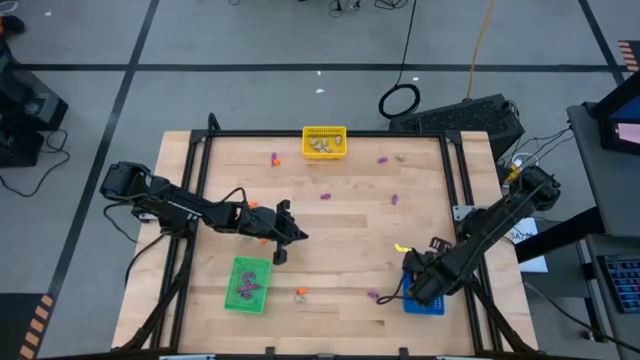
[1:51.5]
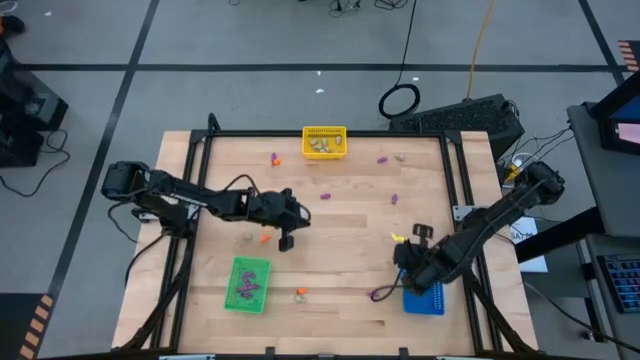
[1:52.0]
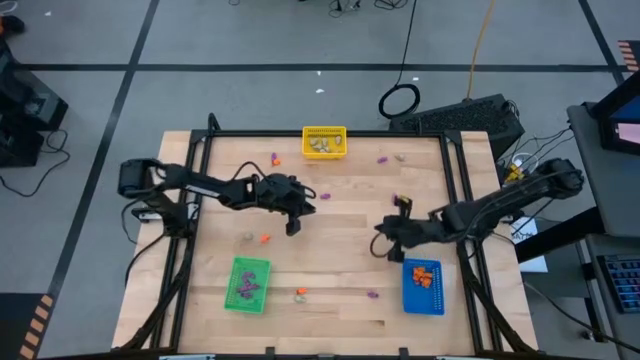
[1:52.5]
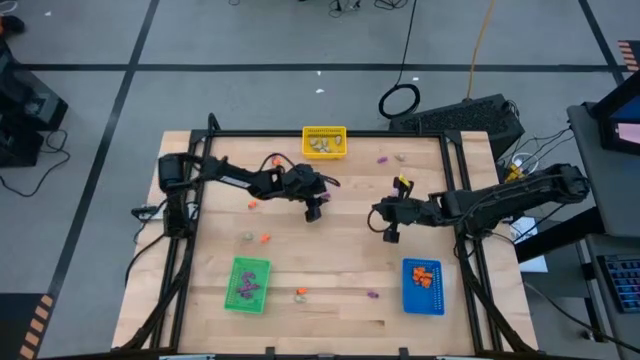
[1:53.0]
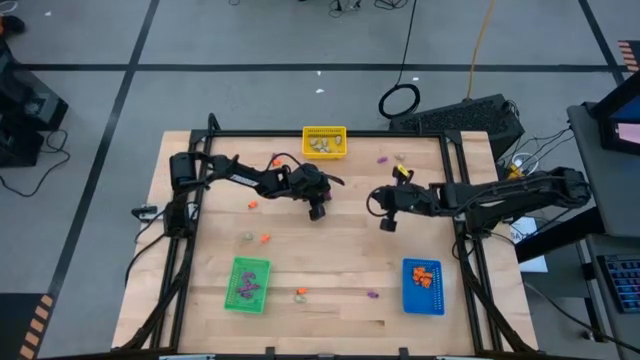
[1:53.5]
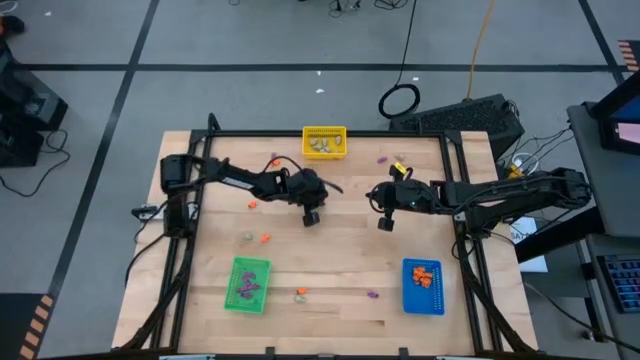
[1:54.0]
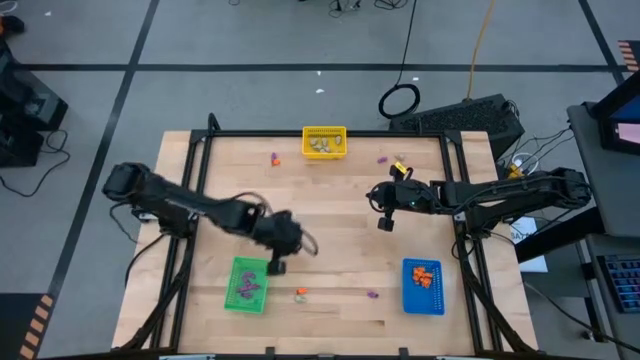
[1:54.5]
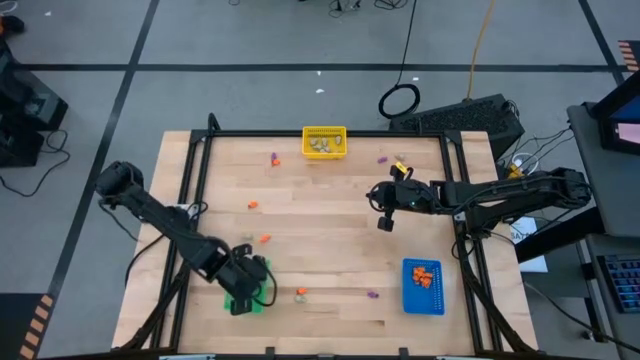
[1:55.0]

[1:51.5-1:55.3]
Task: Sort Halloween decoration
Put the purple skeleton toy into the green bin

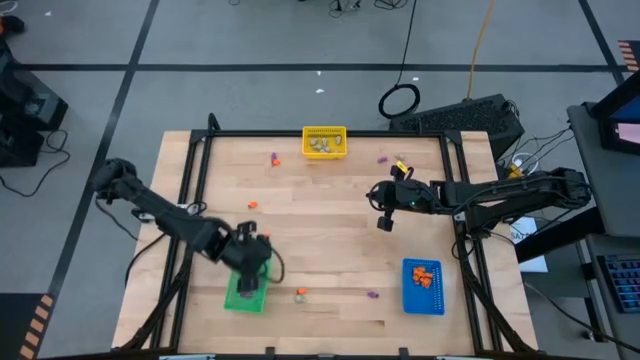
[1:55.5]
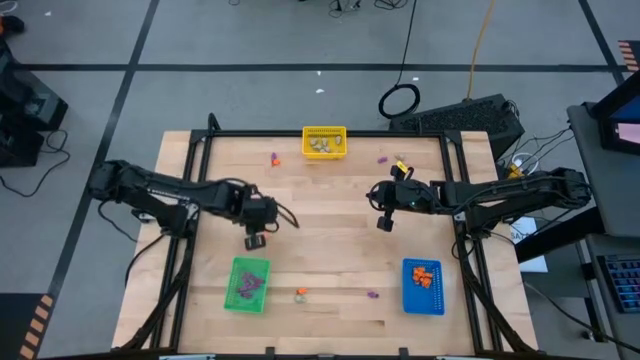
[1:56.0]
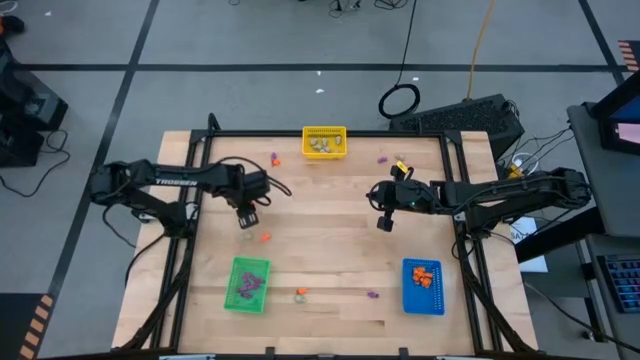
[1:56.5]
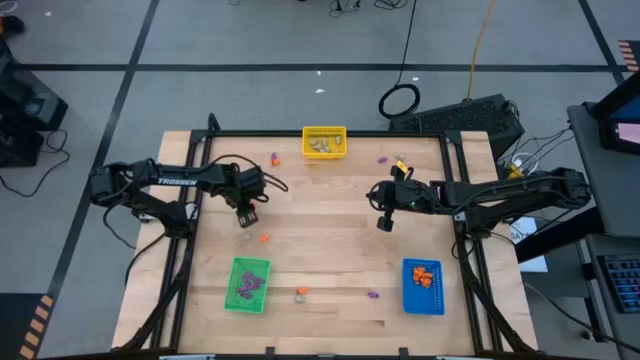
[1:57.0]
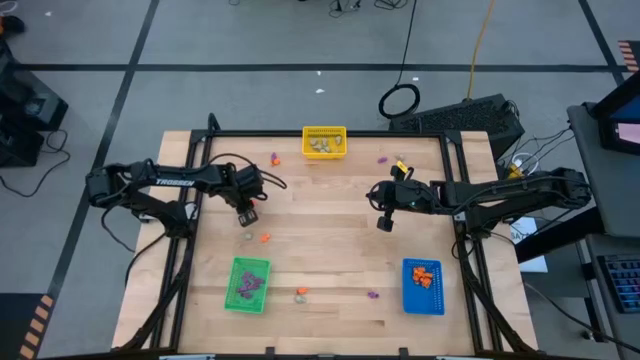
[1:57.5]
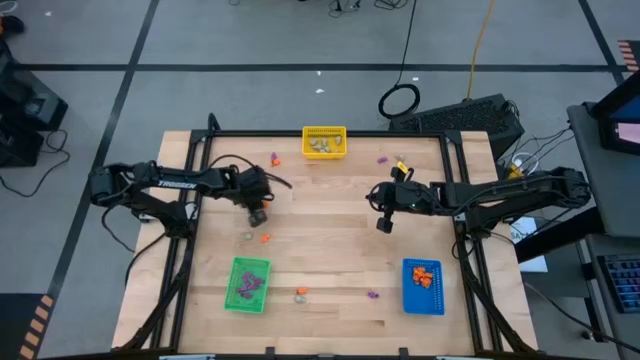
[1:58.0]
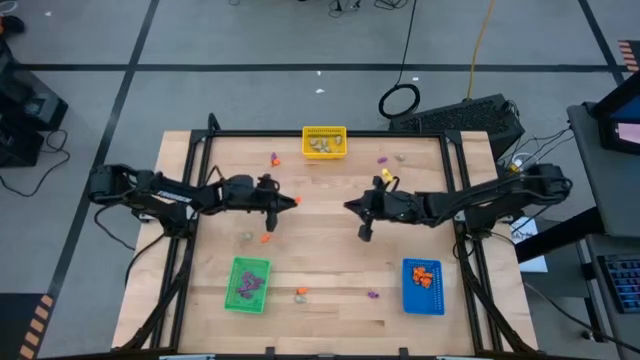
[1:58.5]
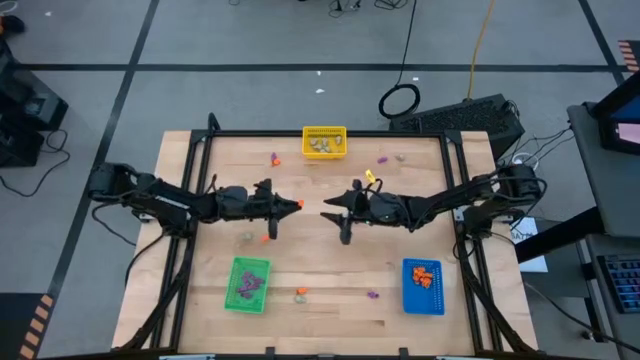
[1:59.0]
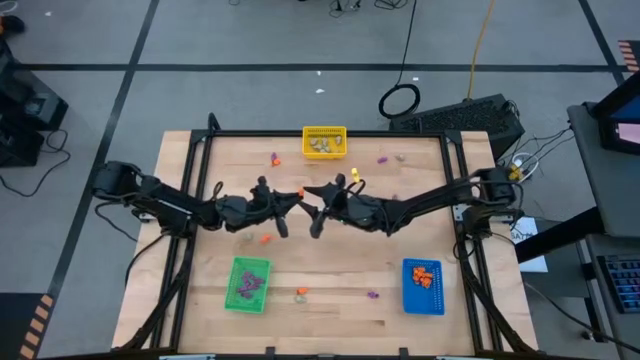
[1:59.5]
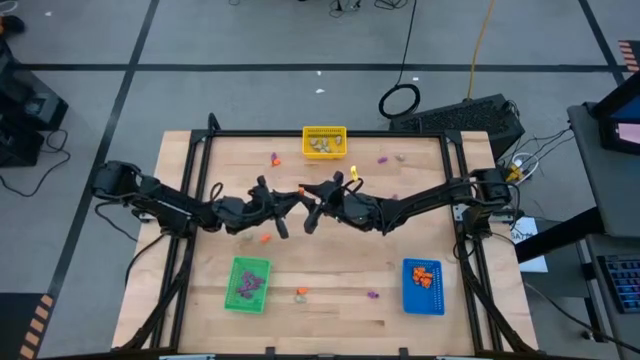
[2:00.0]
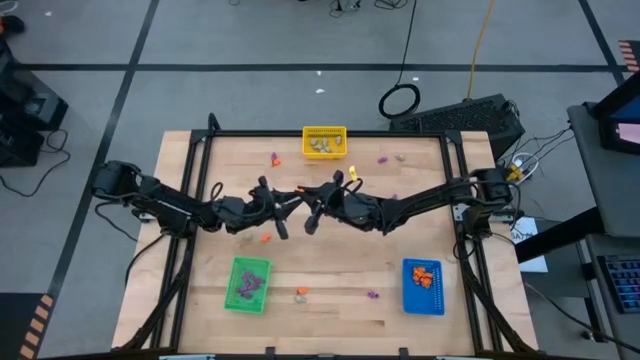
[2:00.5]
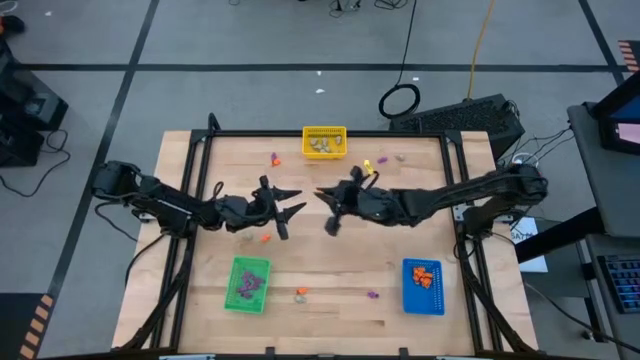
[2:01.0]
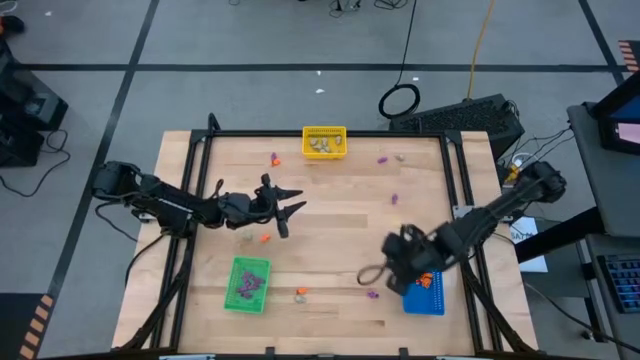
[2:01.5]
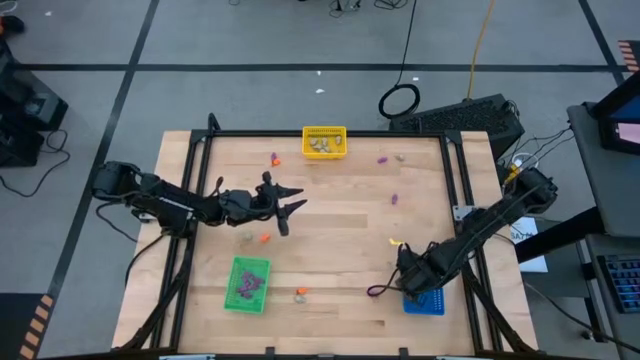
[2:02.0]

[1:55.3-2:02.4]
Put the orange skeleton toy into the blue bin

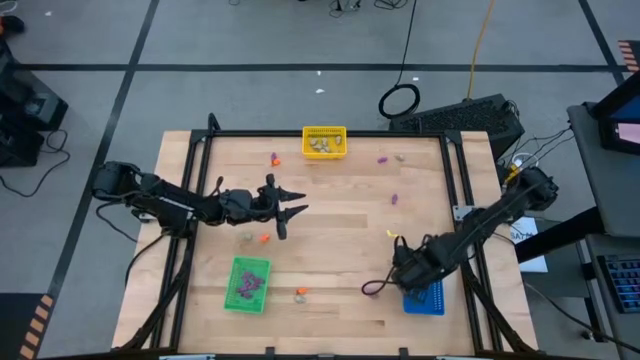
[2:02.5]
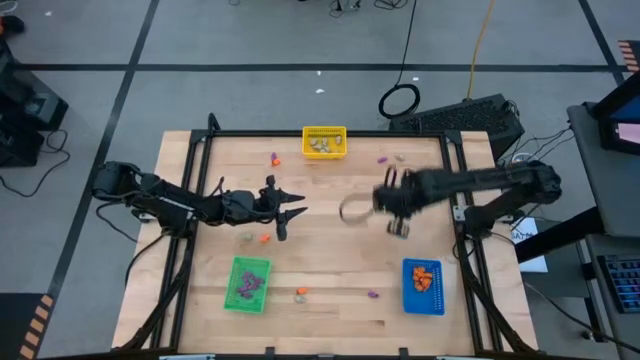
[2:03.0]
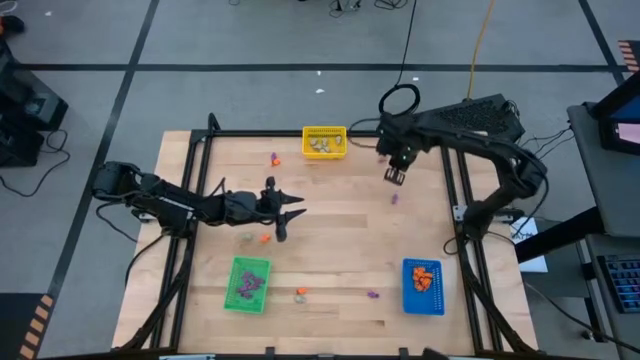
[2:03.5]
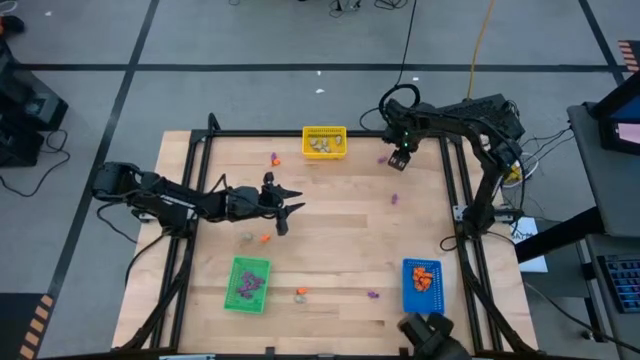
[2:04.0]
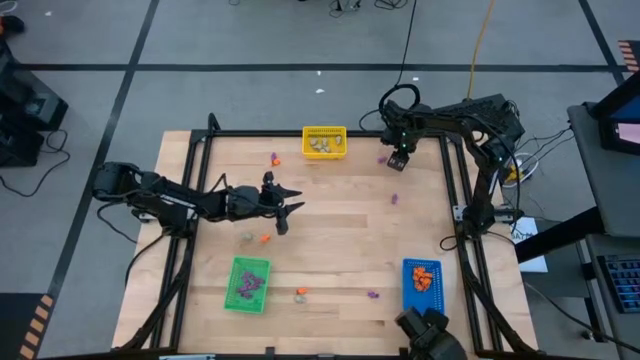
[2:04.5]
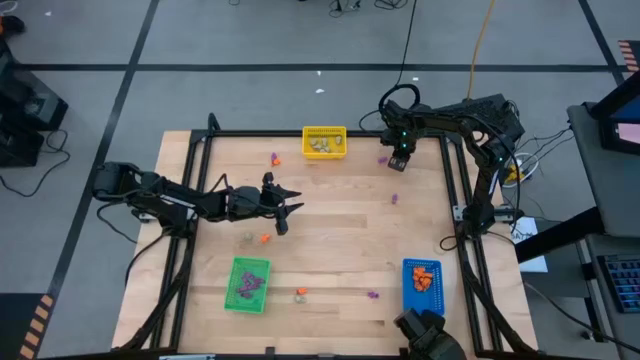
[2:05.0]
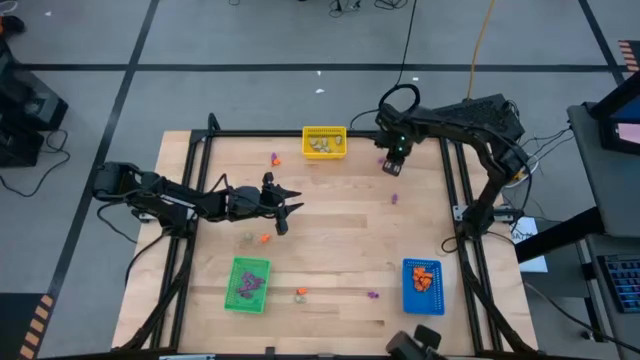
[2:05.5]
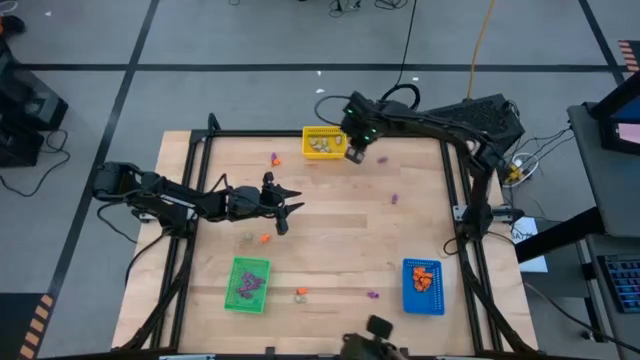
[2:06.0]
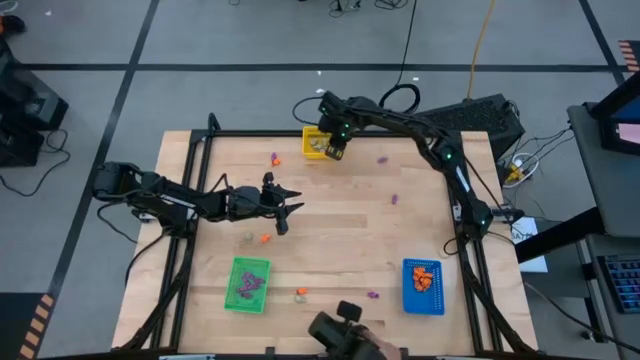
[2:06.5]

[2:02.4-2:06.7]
Put the gray skull toy into the yellow bin

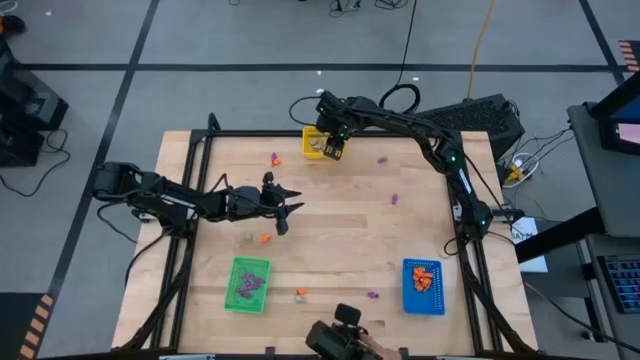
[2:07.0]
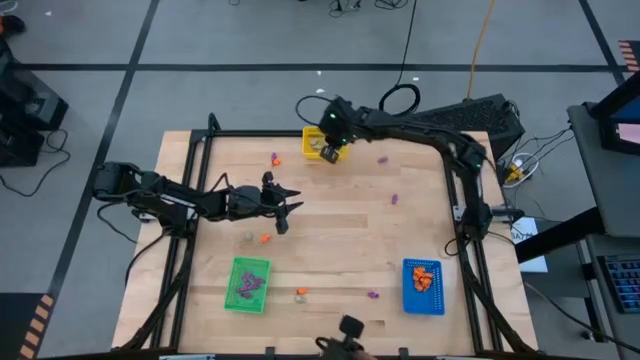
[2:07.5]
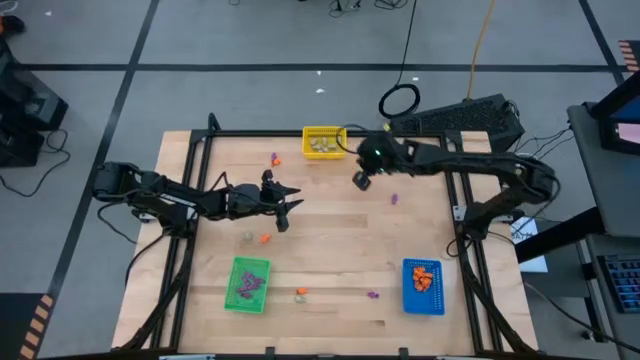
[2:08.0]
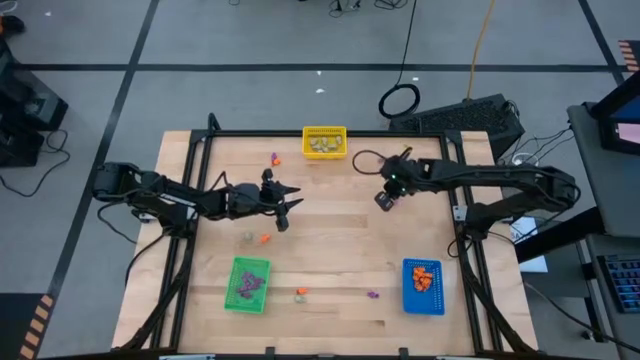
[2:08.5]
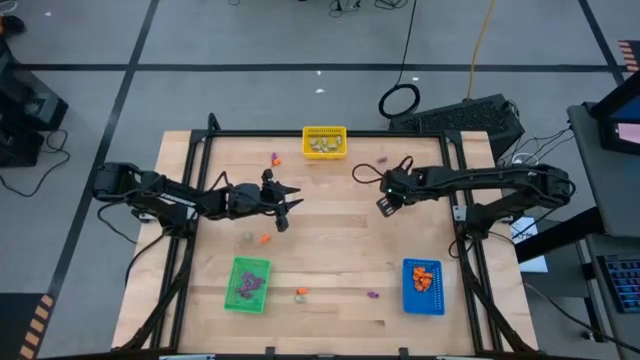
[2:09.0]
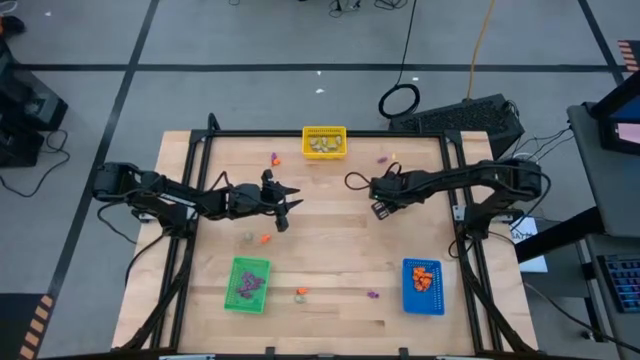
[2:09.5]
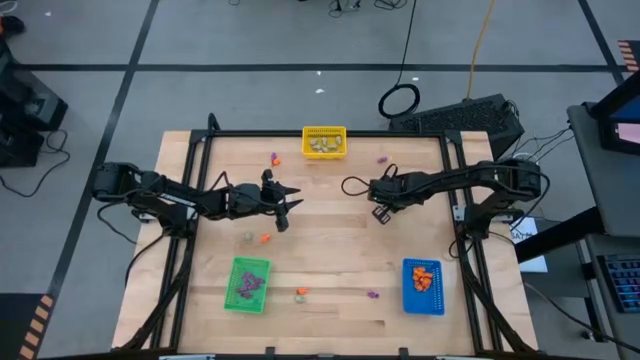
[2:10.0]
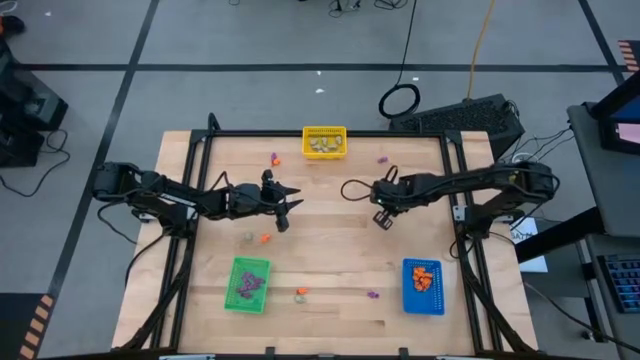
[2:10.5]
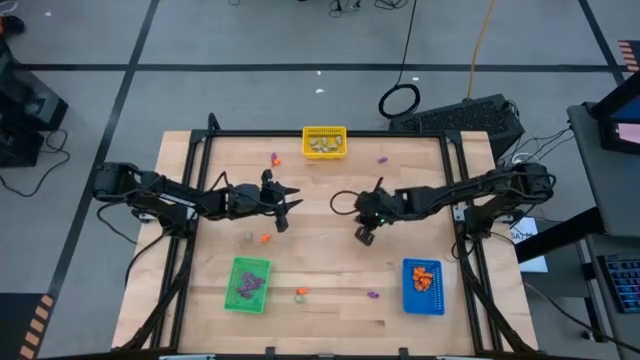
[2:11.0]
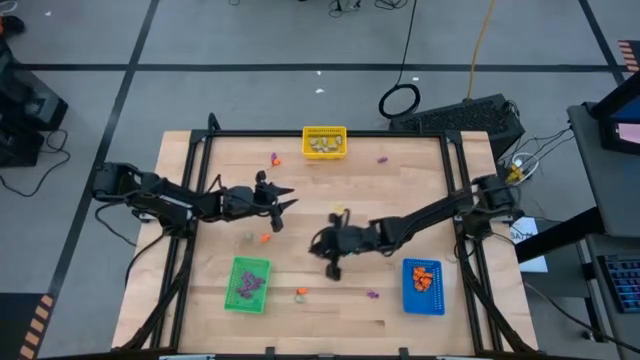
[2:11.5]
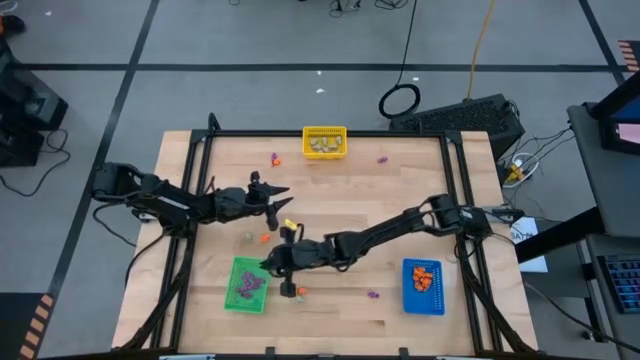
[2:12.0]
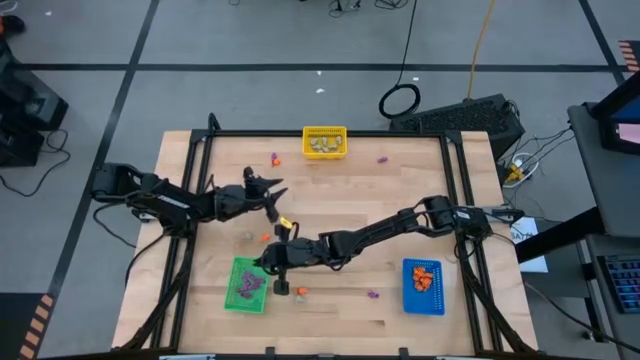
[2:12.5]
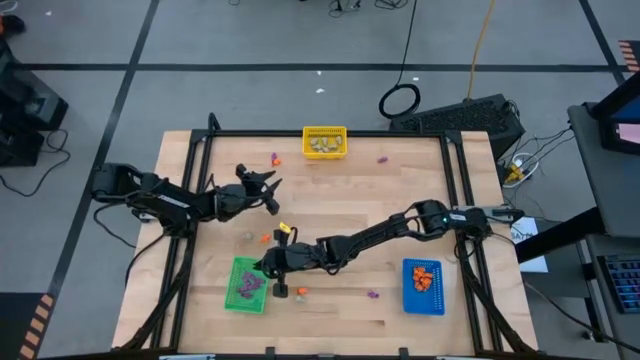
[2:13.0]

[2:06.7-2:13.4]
Put the purple skeleton toy into the green bin
